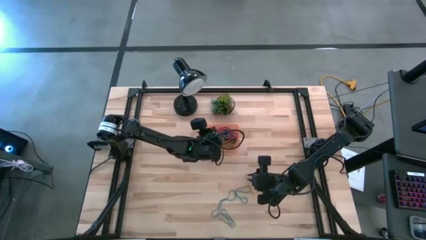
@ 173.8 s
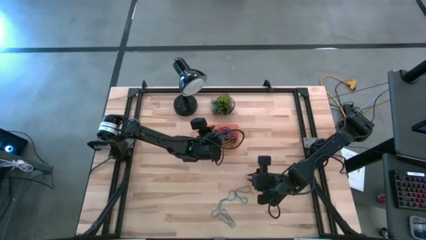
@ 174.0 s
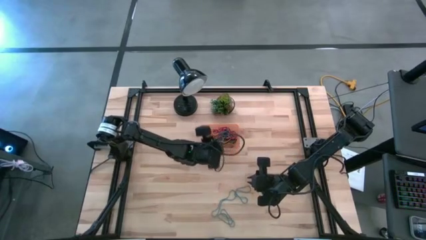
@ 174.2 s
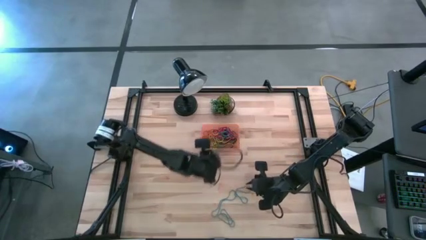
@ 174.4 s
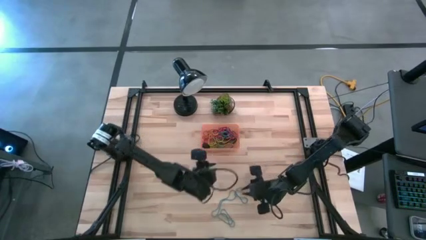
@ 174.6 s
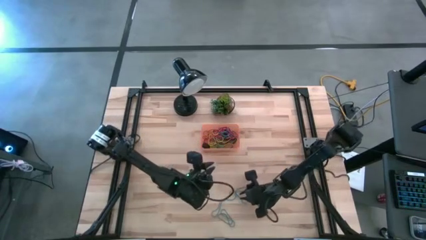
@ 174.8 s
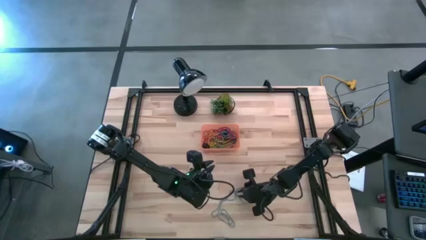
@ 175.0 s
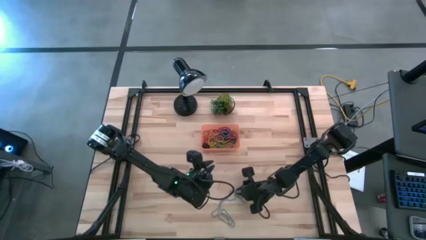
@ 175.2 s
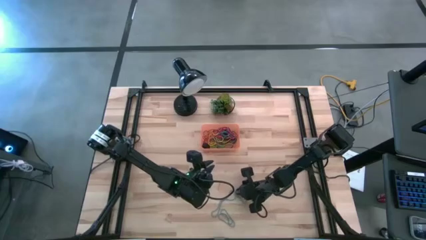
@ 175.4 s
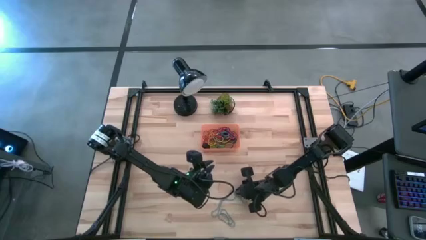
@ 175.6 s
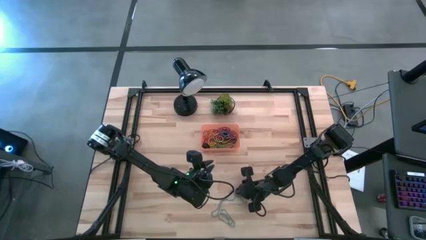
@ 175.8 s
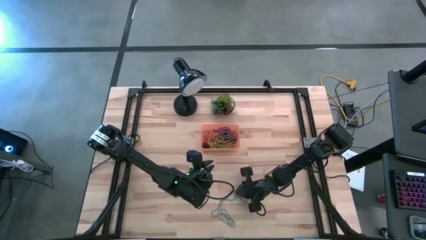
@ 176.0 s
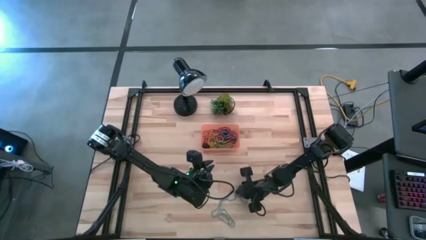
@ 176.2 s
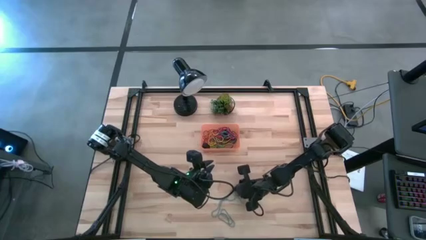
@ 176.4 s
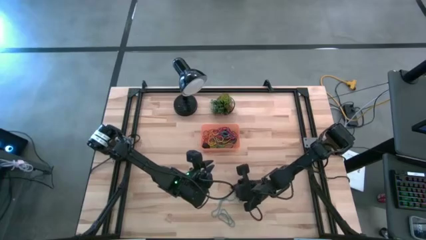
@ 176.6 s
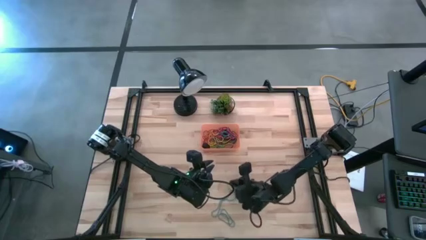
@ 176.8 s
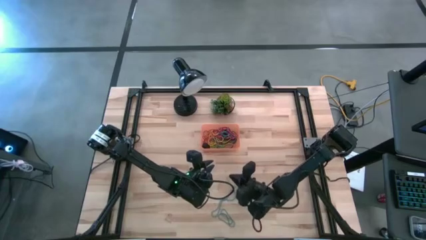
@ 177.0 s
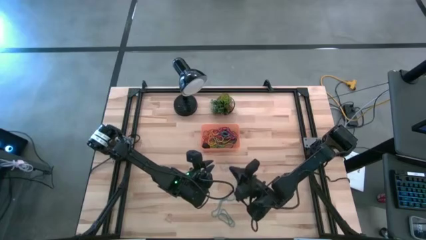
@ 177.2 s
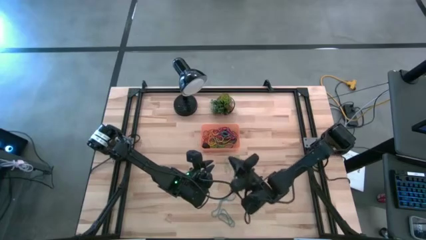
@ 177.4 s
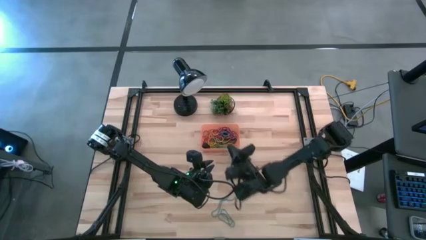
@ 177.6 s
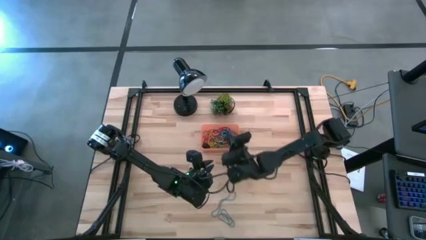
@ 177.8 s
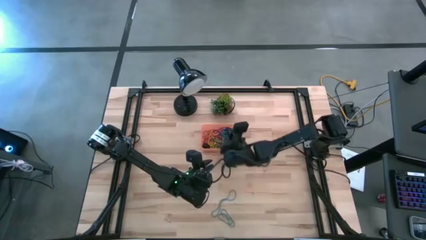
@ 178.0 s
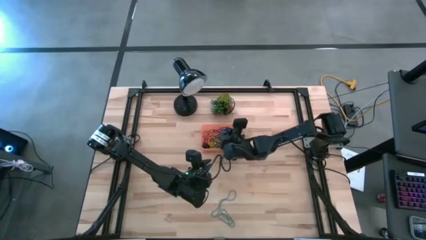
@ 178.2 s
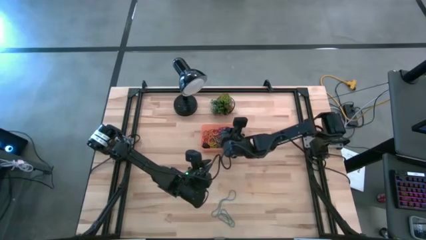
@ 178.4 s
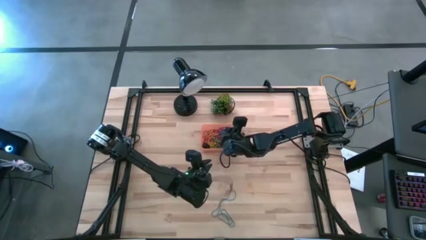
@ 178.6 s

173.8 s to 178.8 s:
Task: Pick and place rubber bands into bin
Put the blue rubber band into the orange bin

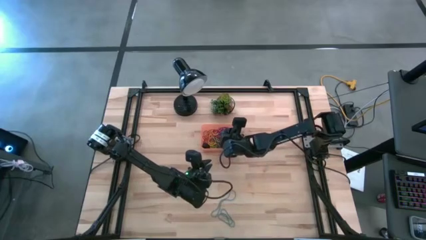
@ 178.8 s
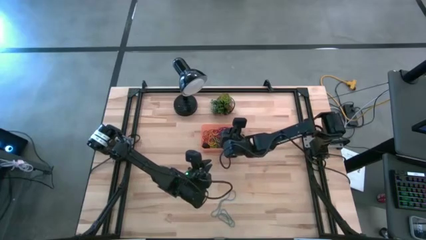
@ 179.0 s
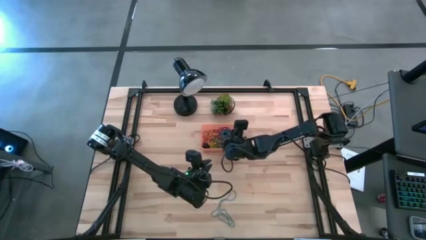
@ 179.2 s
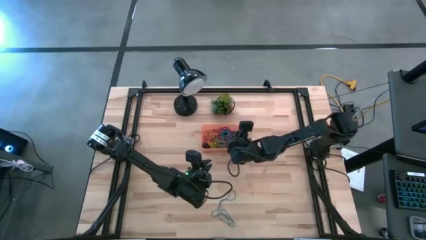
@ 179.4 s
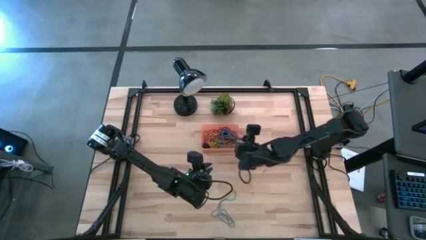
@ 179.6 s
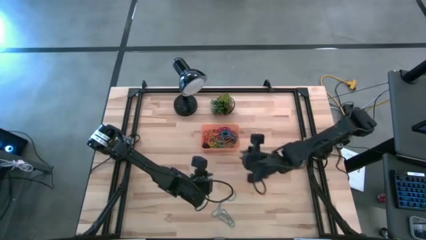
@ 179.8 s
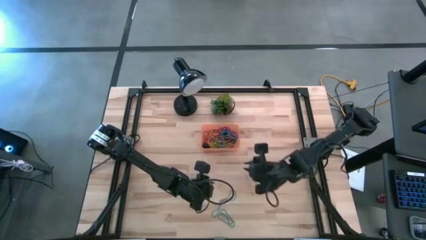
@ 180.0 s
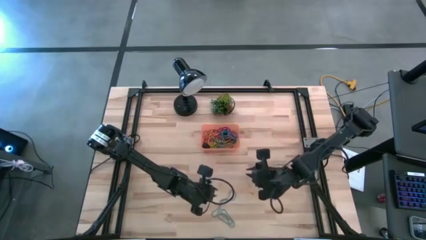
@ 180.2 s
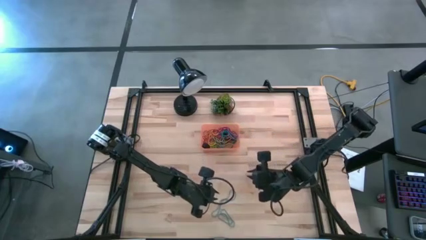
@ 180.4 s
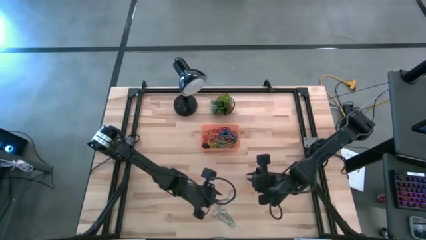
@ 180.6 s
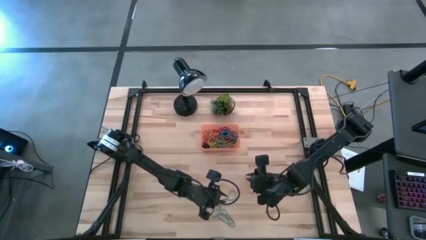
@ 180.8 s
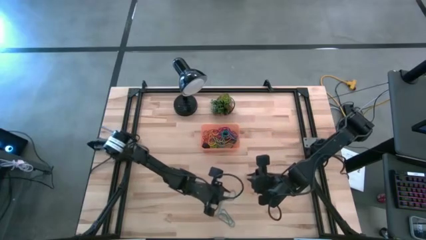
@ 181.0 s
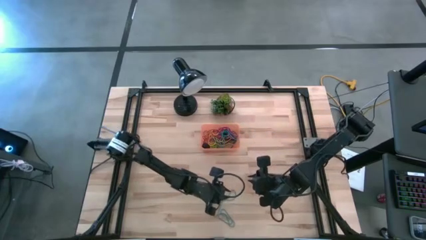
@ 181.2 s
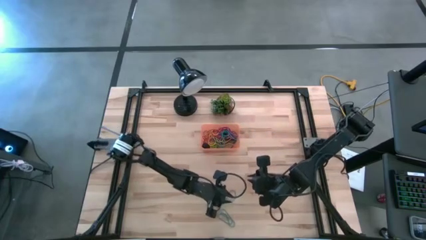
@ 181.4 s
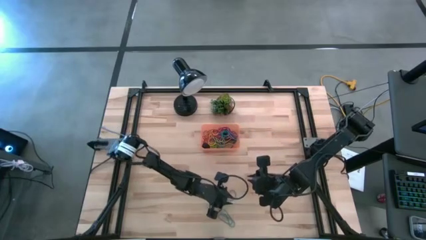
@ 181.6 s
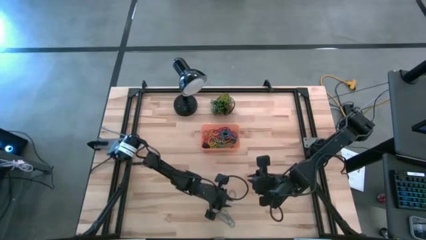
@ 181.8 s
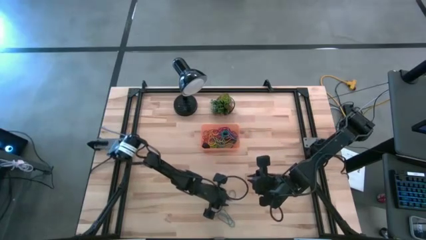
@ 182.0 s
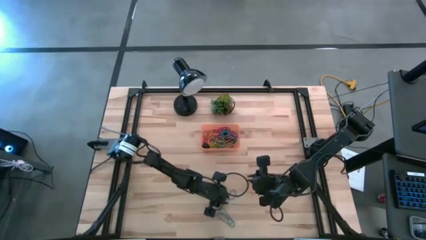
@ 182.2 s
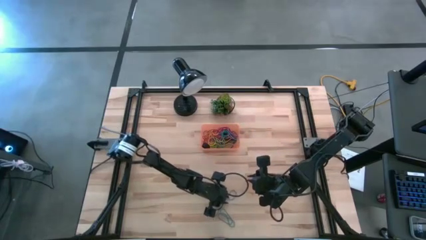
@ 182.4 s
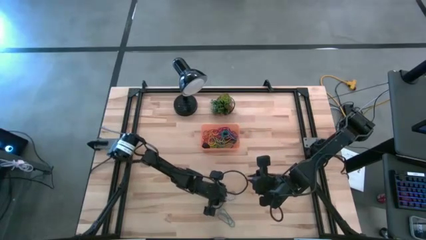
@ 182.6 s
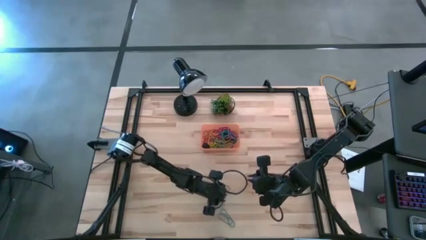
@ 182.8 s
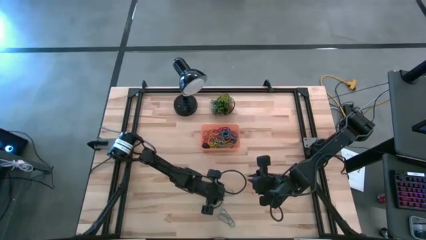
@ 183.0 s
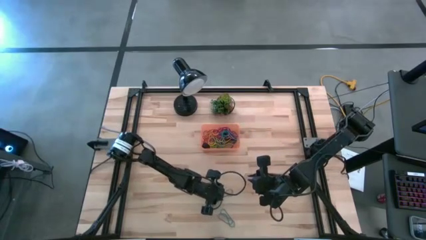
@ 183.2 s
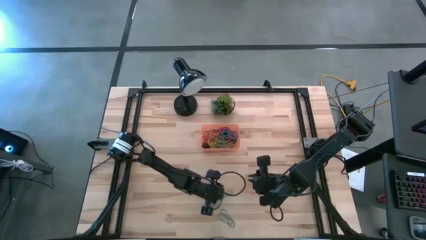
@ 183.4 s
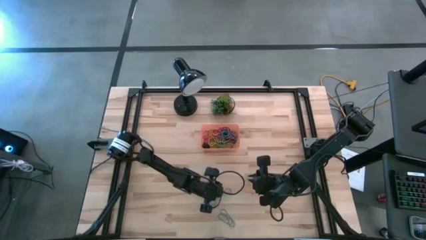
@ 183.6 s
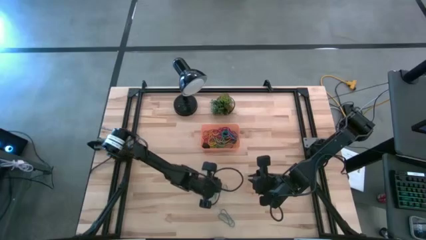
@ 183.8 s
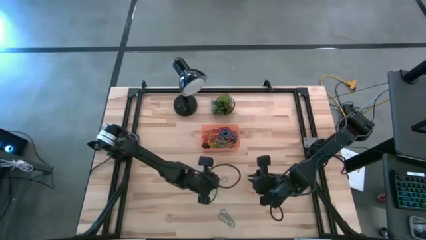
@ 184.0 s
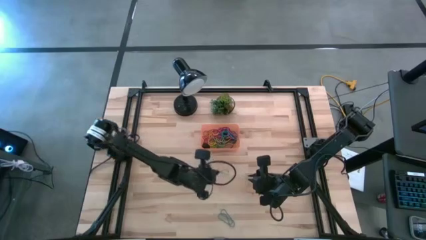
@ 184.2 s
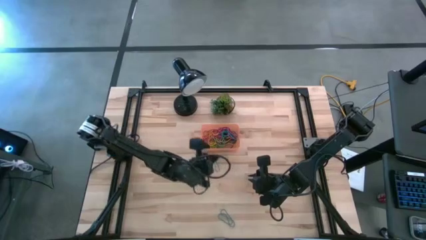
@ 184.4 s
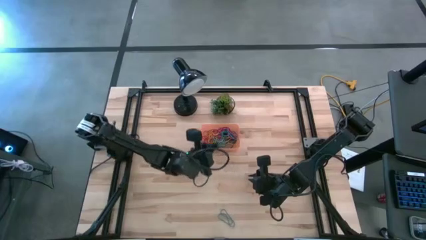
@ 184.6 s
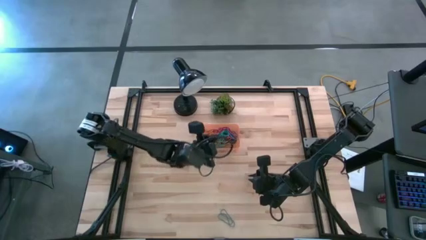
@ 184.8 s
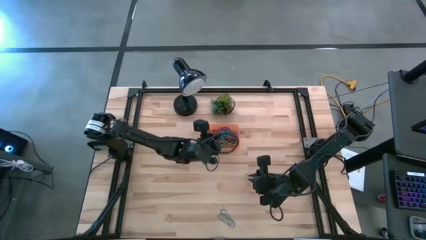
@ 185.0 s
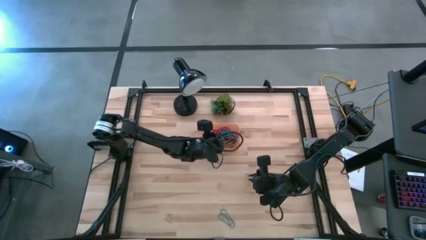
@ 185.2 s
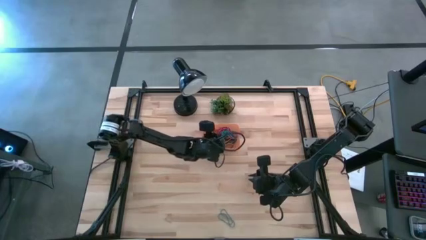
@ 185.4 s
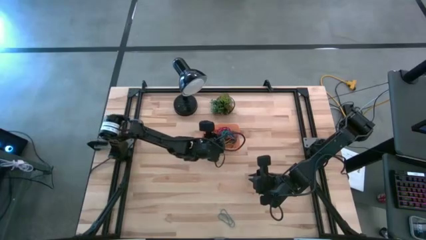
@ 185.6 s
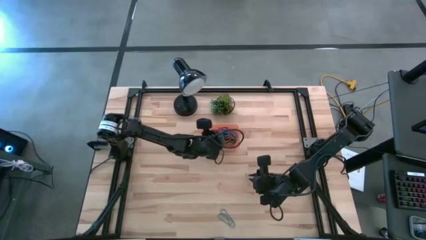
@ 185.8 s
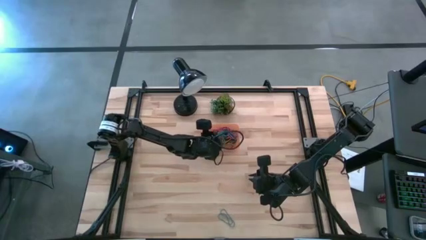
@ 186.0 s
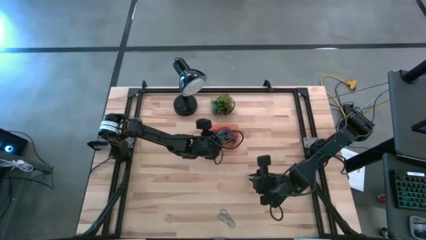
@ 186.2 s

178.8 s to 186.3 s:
Put the blue rubber band into the orange bin

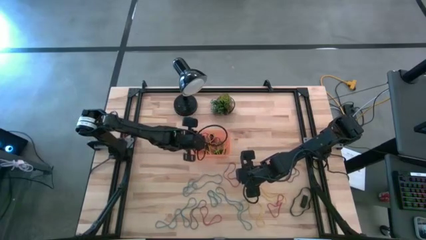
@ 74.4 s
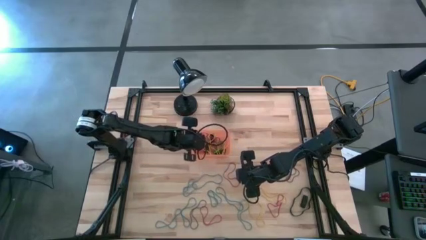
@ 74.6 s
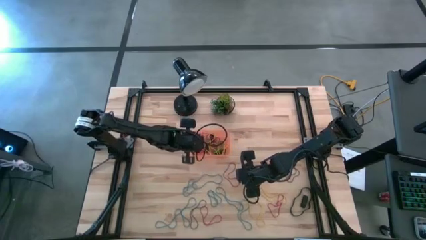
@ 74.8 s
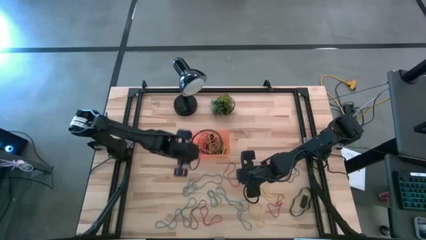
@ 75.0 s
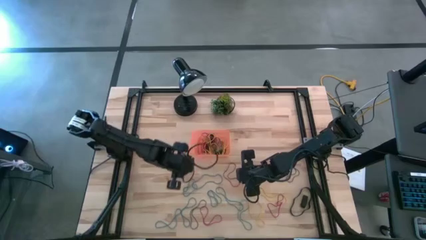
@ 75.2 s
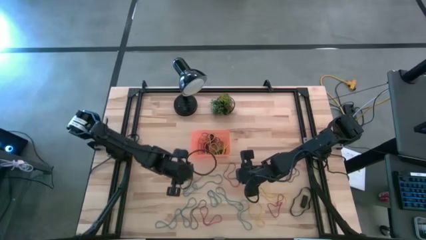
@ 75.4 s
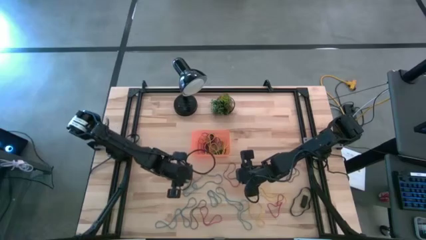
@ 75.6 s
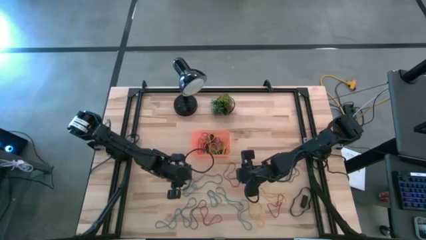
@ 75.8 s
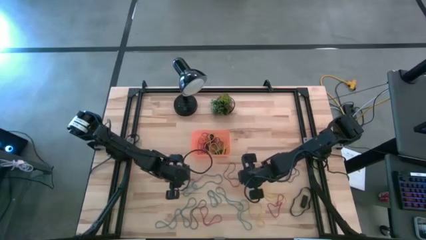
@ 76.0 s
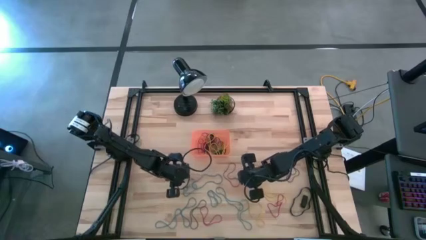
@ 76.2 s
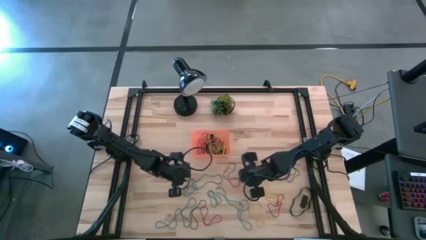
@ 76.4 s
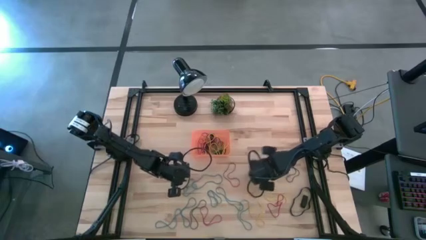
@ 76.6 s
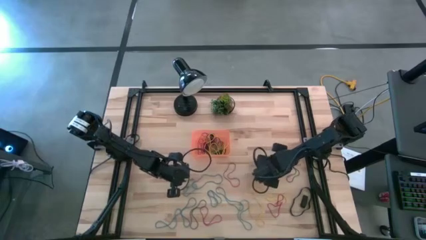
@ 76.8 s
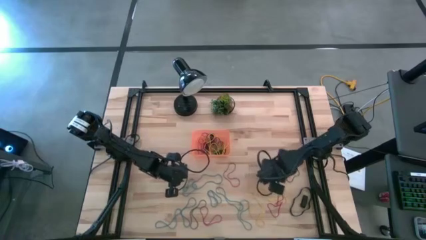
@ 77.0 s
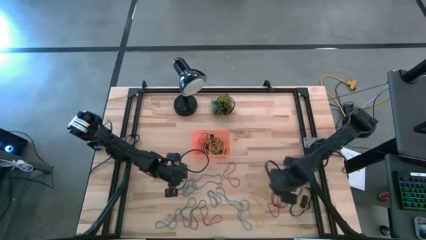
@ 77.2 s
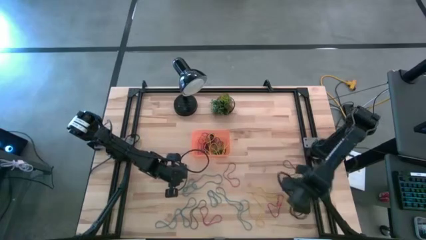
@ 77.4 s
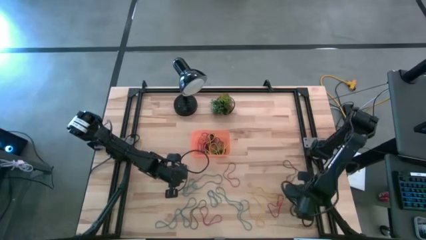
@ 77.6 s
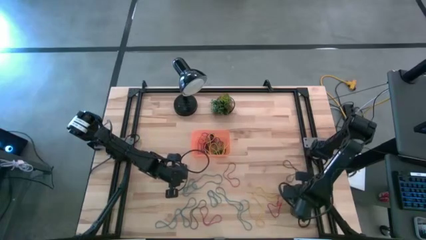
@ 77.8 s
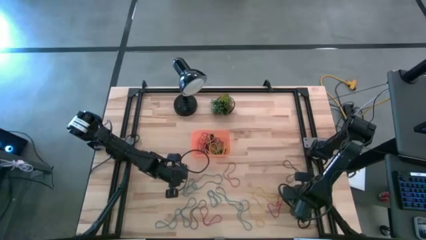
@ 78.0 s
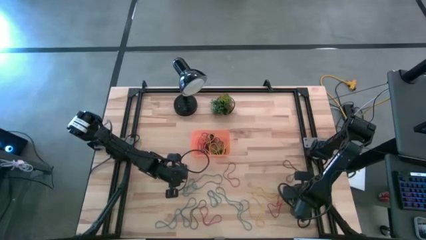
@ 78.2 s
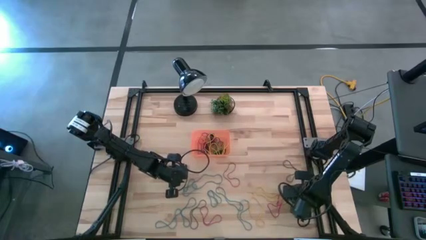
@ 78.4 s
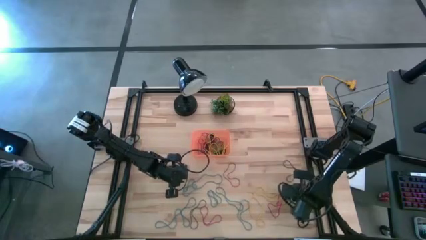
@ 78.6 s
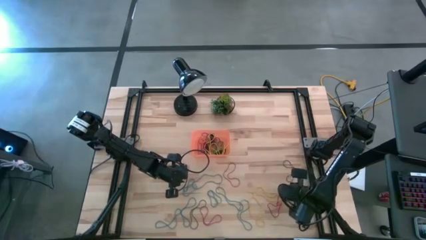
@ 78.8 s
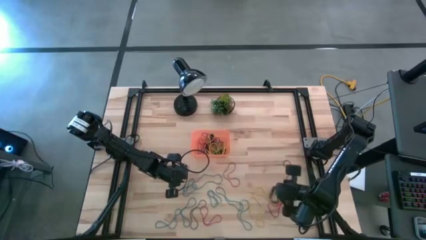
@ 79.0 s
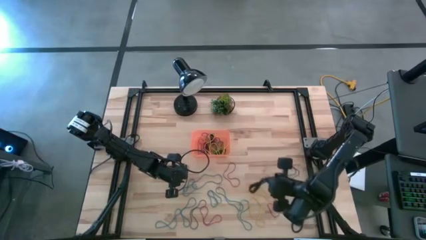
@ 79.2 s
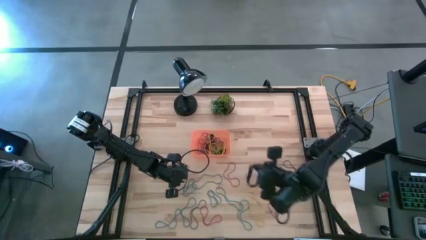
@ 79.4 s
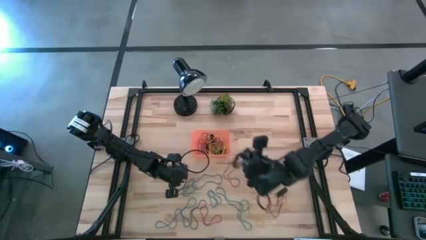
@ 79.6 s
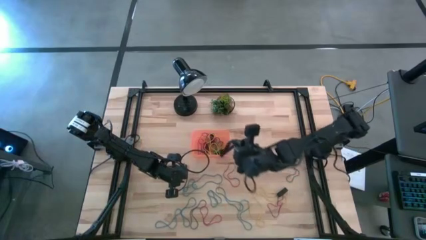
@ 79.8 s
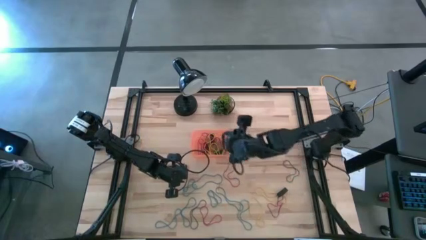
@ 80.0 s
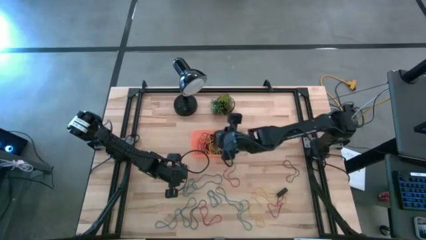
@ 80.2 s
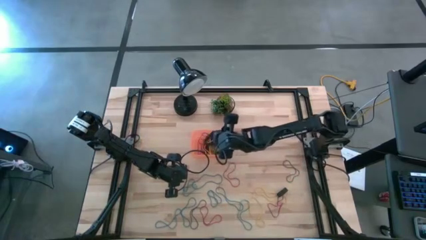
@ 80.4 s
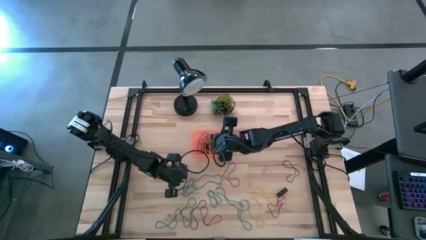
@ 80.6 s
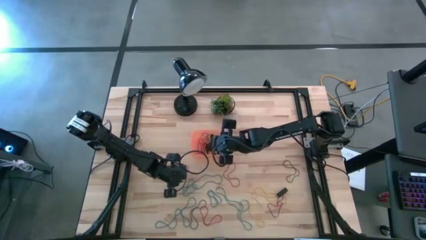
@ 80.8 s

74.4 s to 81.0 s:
Task: Pick and place rubber bands into bin
Put the black rubberband into the orange bin
